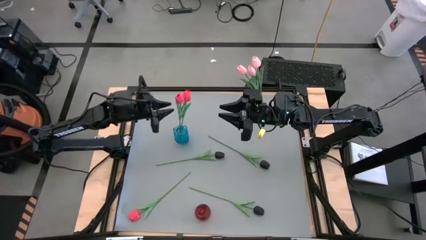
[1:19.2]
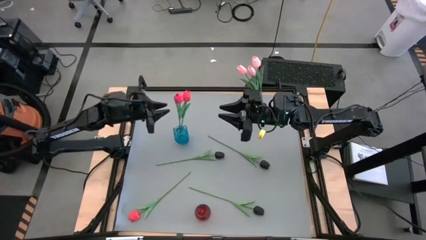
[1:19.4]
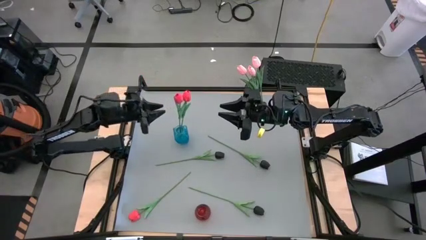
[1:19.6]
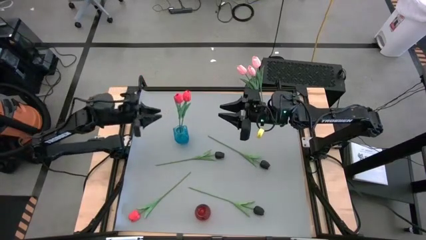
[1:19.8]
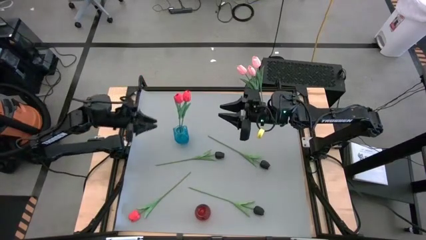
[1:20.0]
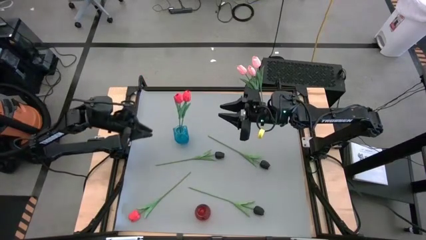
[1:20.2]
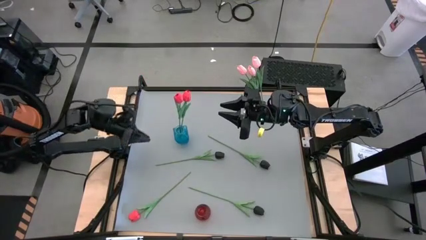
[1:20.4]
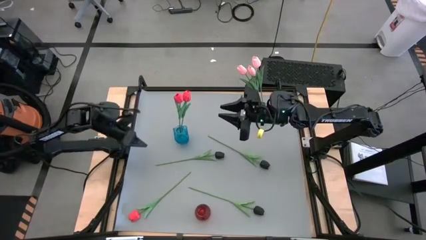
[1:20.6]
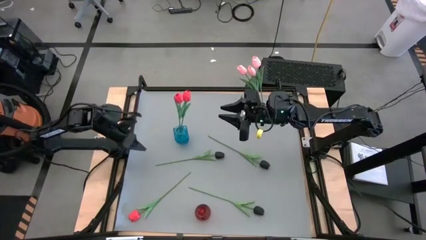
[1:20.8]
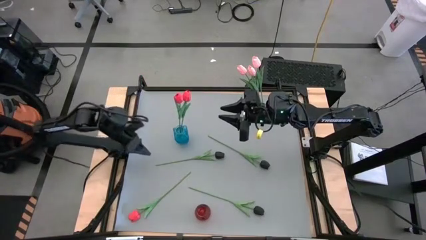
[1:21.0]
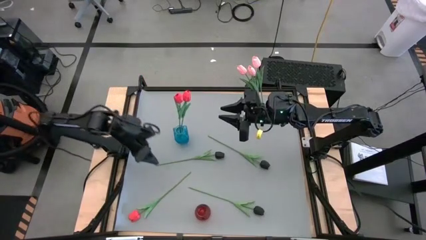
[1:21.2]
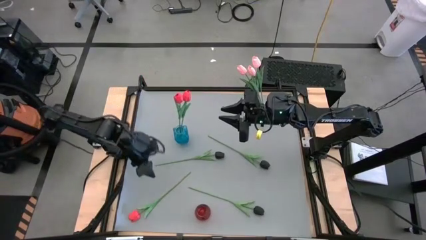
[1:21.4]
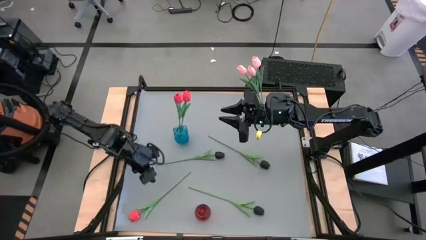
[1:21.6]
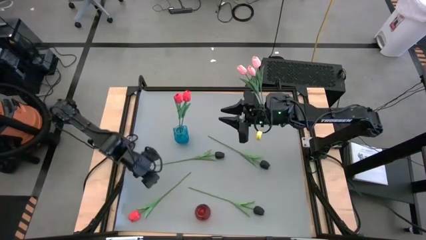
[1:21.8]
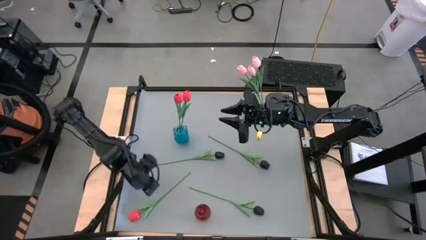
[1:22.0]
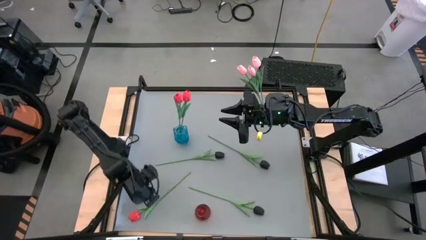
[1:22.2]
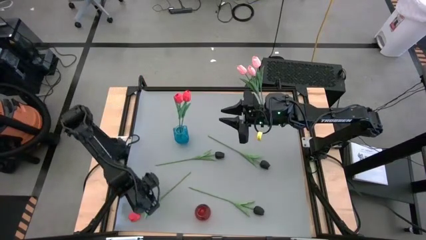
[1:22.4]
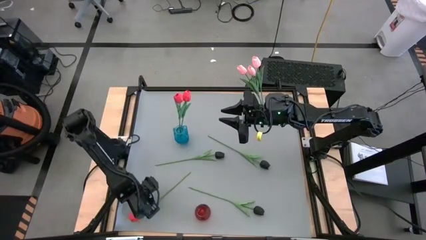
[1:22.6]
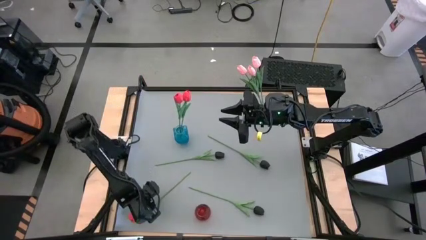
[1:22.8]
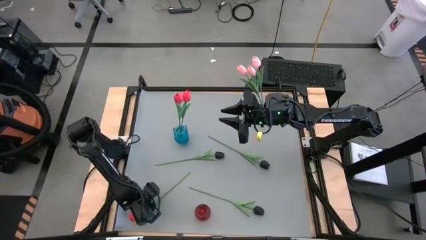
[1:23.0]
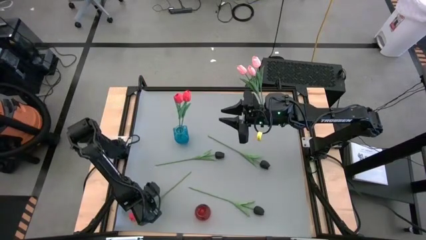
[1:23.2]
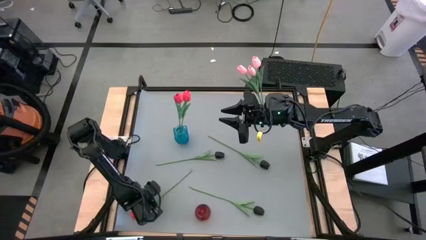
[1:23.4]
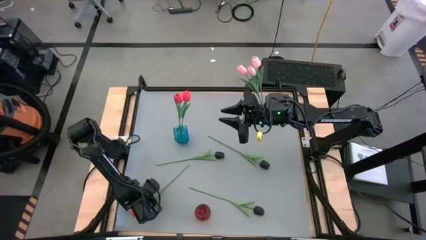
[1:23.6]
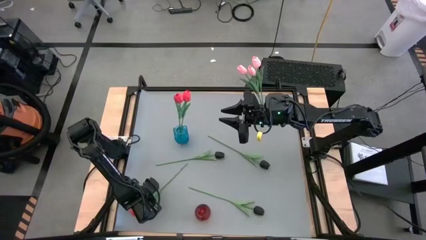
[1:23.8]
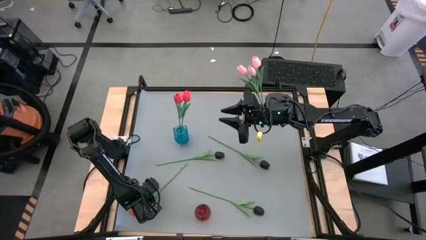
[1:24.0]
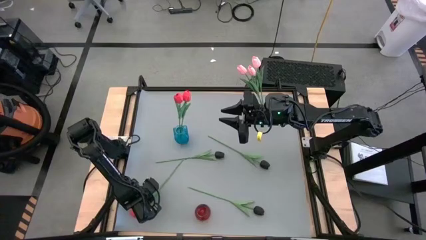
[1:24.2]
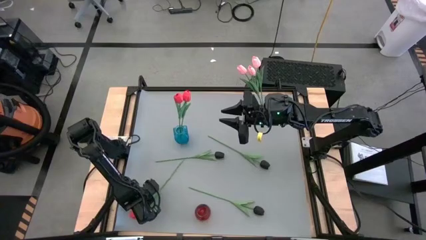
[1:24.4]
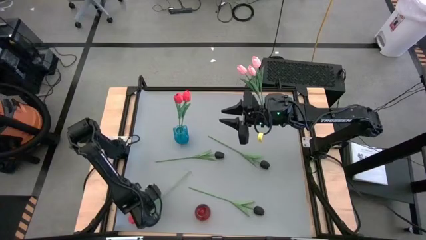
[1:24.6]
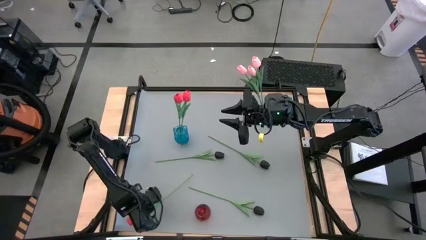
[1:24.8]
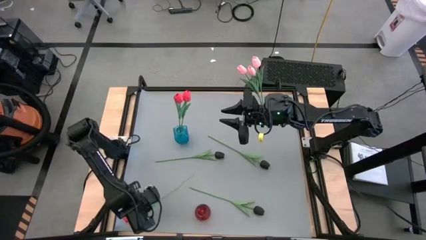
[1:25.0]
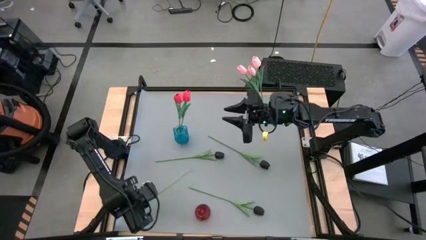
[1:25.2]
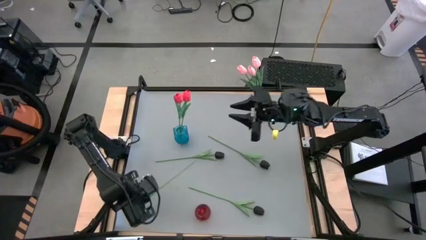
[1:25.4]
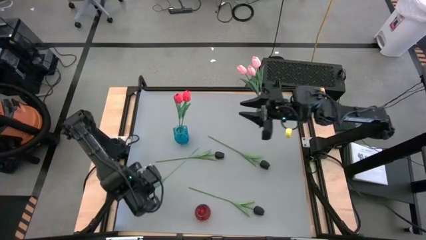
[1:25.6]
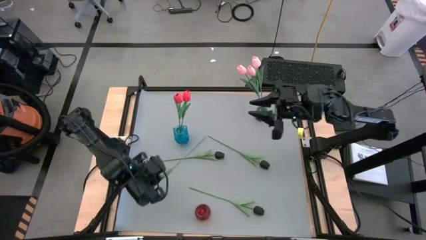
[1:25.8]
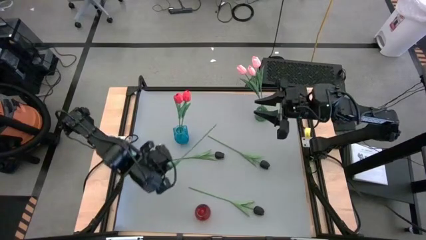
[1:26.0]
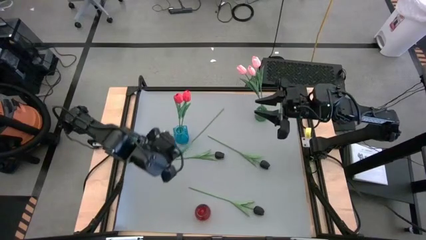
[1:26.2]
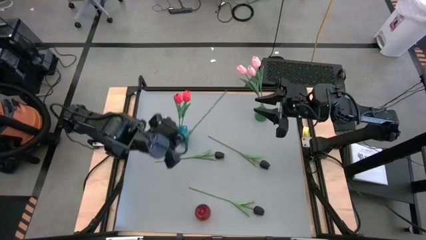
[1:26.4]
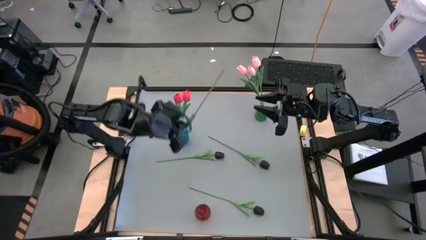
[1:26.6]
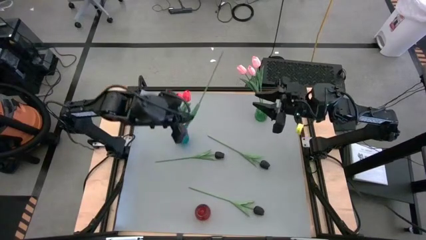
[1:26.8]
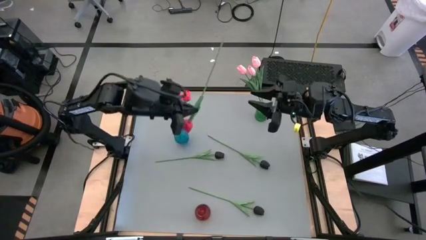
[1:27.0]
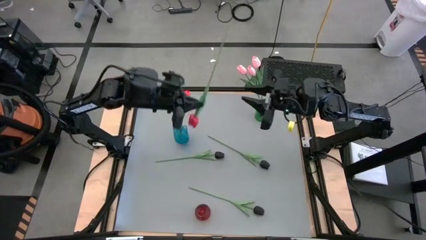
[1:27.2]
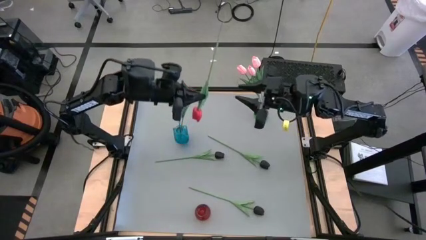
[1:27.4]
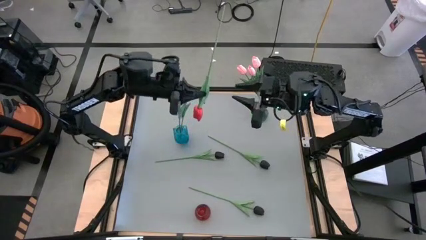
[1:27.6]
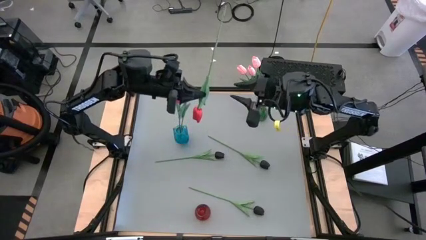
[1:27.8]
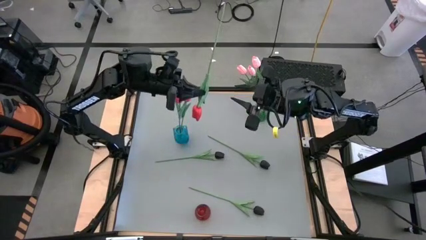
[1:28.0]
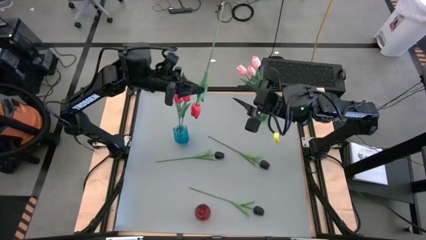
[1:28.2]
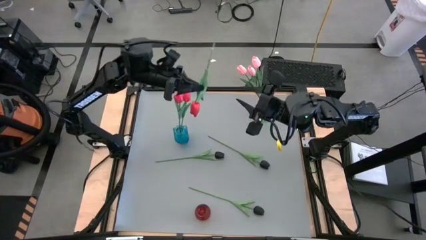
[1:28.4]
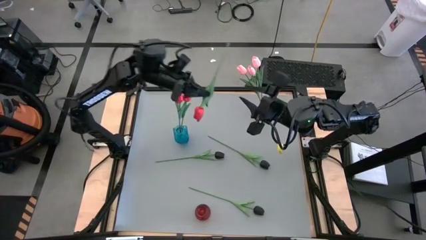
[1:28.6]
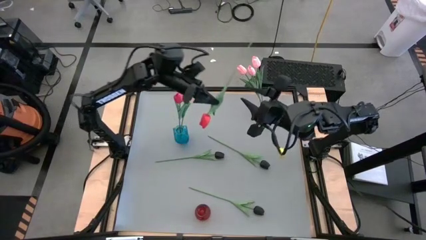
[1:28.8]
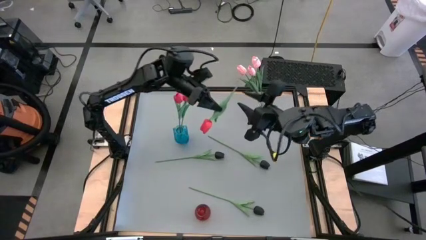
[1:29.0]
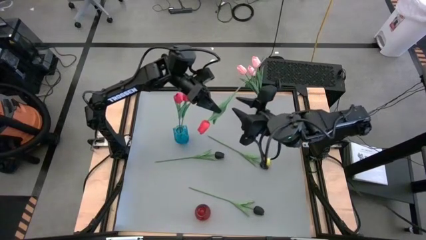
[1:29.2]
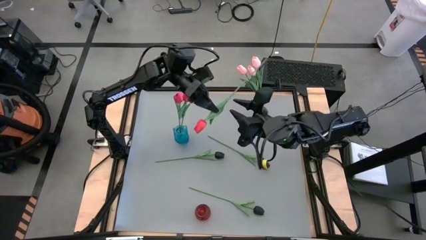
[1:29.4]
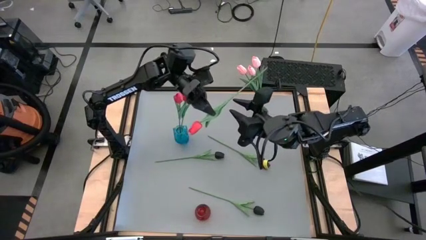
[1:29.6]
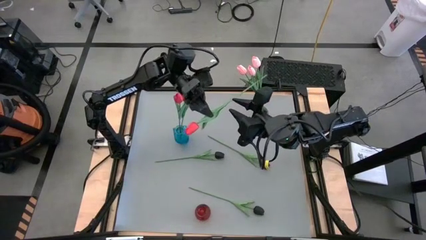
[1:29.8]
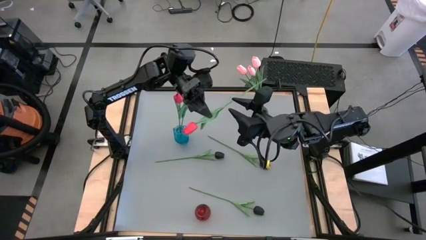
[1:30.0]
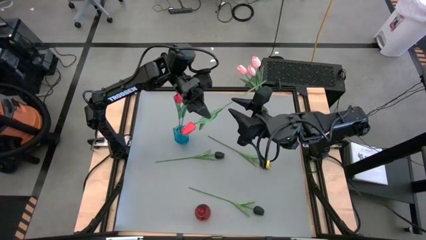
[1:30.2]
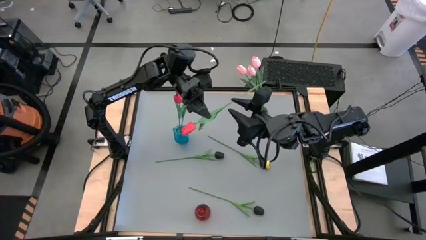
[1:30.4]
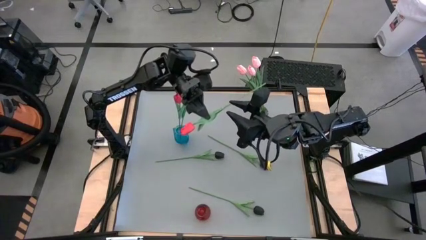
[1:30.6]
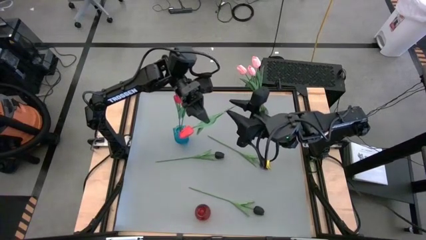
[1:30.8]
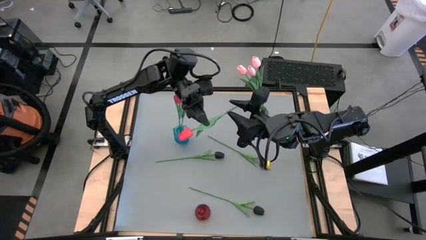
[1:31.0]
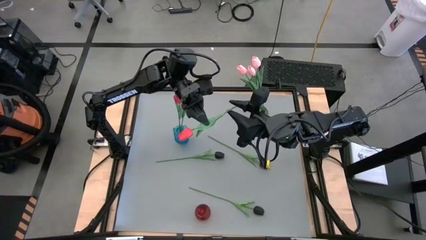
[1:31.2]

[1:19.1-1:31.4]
Task: Sort flowers into vase by color
Put the red flower into the blue vase

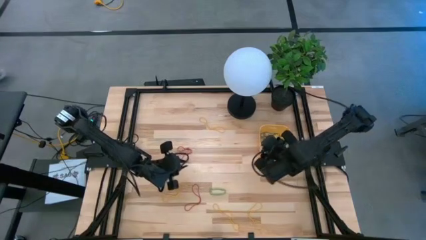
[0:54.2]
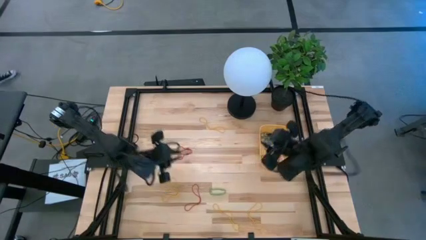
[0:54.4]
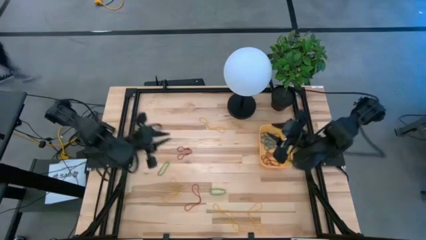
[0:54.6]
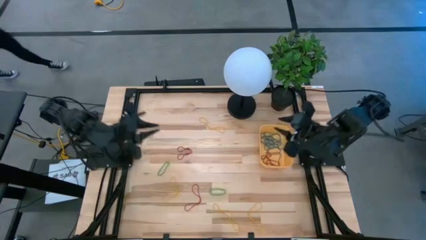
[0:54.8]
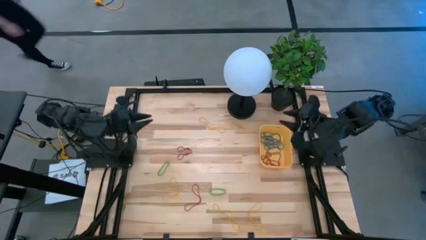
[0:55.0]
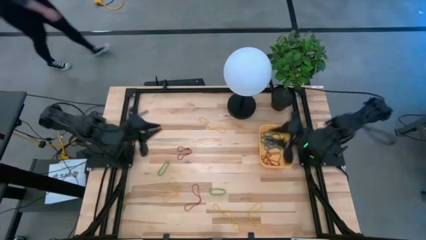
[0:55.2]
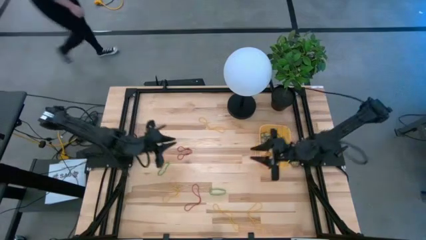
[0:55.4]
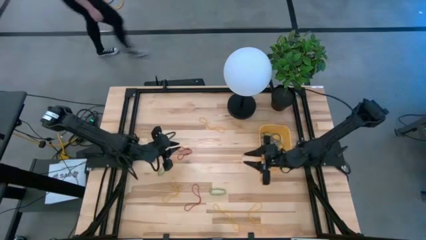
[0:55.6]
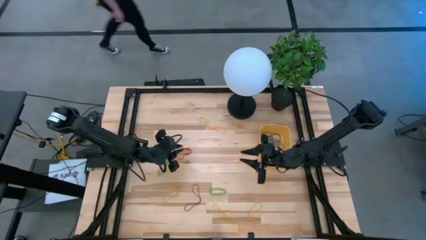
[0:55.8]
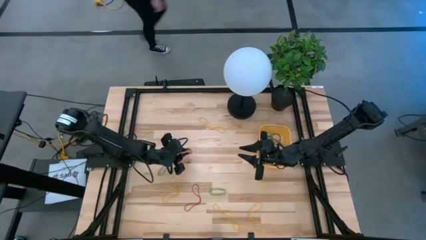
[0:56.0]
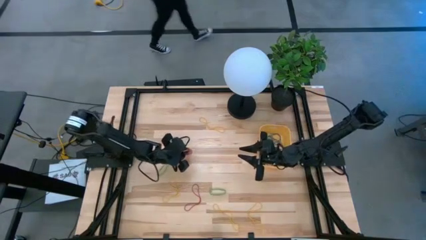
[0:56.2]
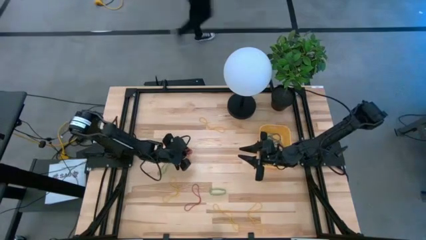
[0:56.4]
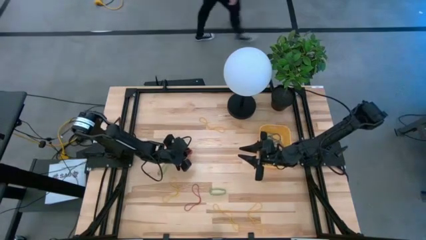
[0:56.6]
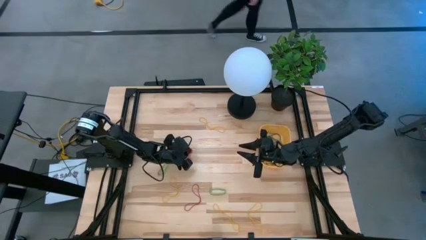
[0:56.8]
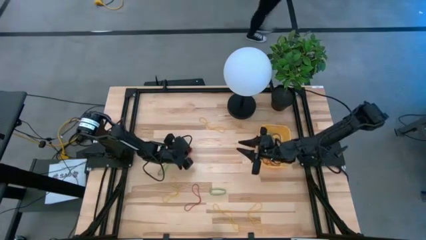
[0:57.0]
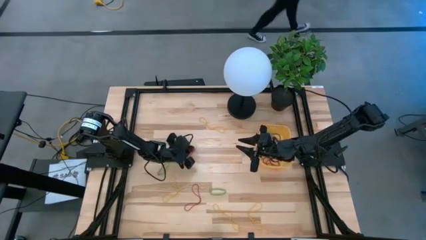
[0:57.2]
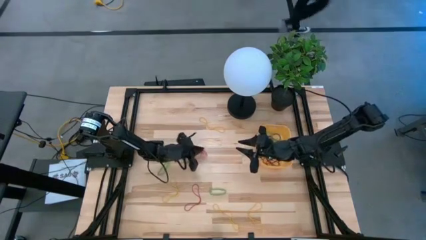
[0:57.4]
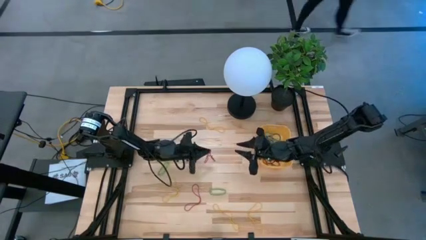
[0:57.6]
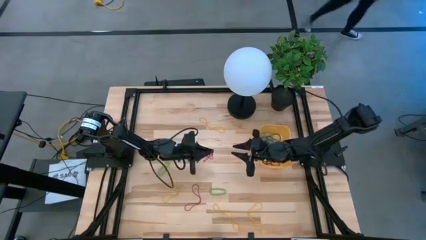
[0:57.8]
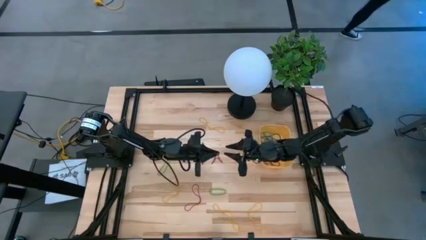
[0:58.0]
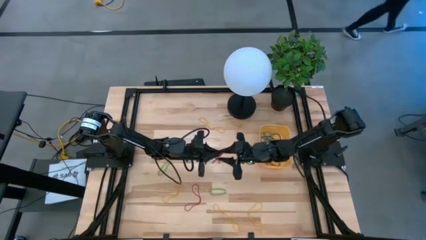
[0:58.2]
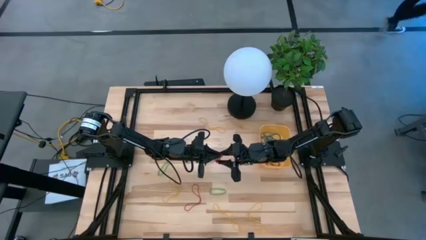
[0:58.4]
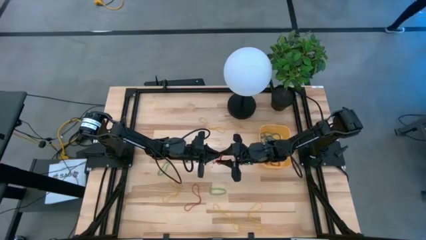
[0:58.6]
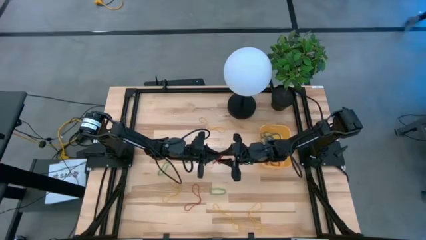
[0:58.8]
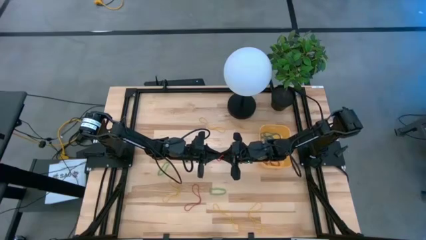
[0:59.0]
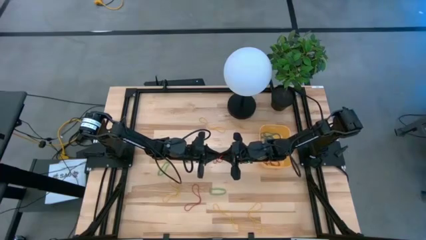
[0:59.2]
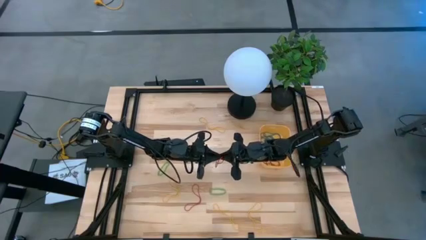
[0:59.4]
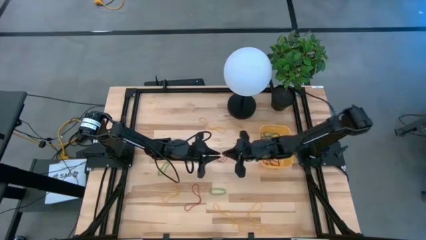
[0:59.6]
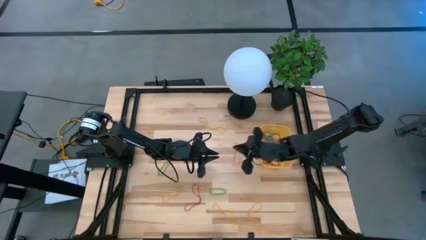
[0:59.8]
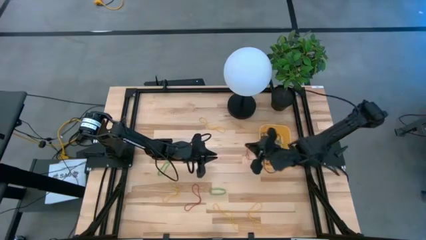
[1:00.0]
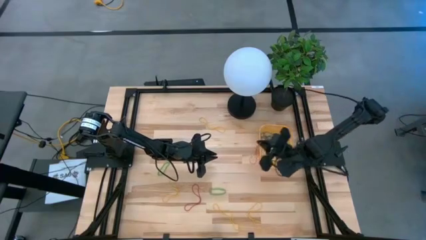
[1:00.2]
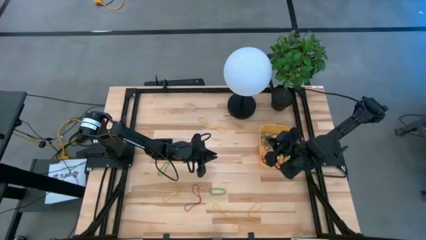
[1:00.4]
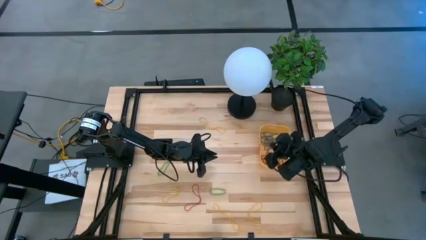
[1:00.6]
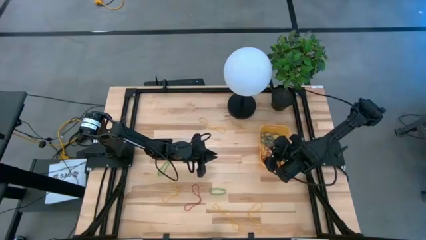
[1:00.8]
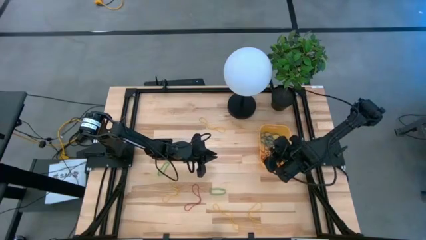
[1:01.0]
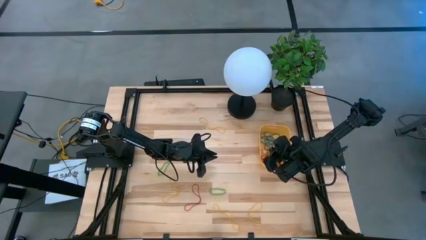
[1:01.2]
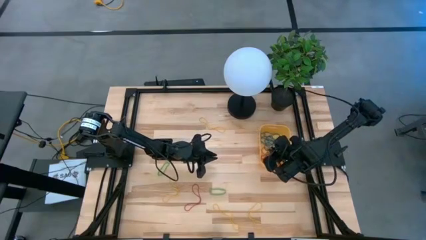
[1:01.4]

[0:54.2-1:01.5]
Task: Pick and place items into bin
Put the red rubber band into the bin
